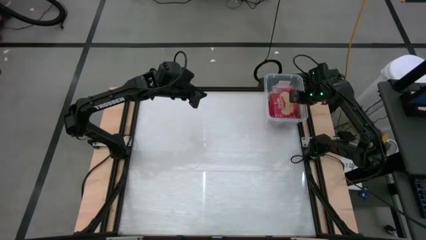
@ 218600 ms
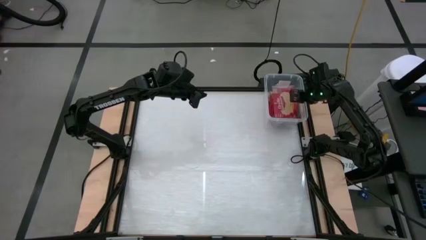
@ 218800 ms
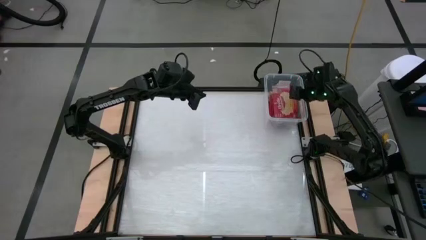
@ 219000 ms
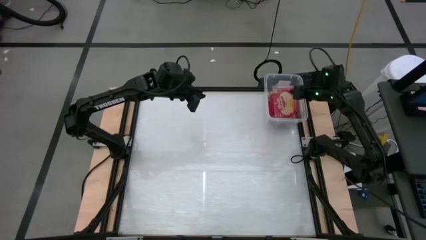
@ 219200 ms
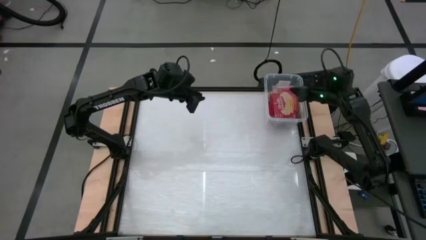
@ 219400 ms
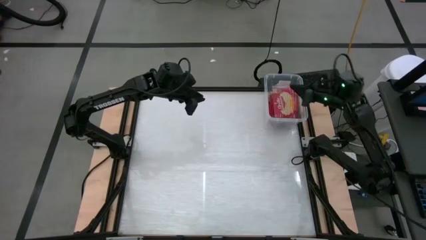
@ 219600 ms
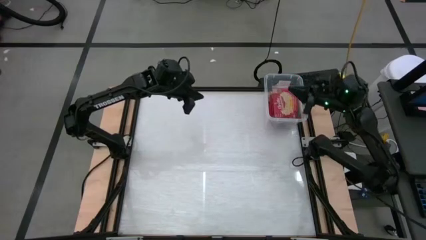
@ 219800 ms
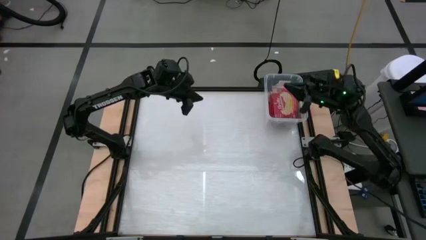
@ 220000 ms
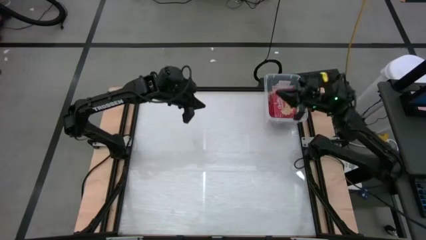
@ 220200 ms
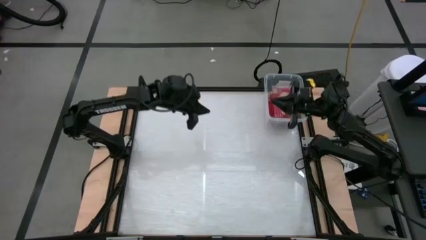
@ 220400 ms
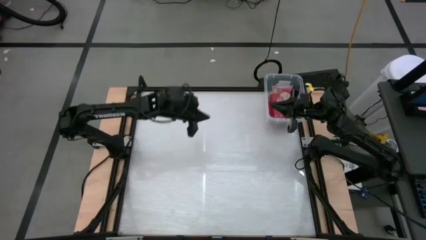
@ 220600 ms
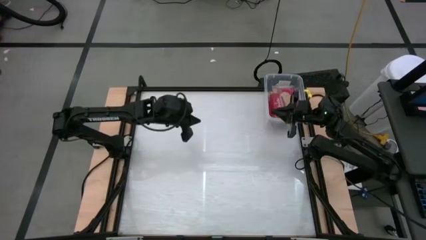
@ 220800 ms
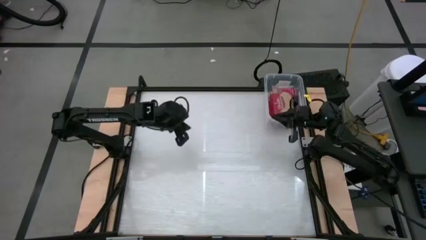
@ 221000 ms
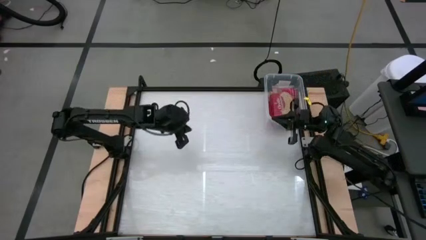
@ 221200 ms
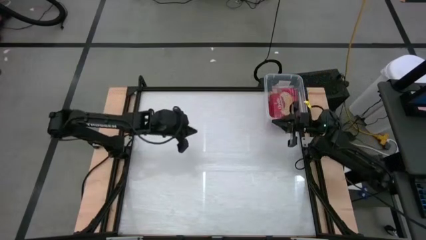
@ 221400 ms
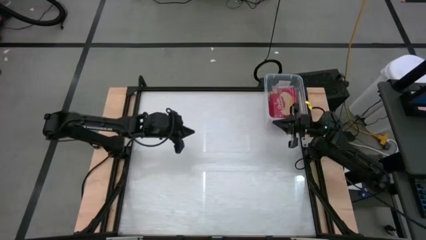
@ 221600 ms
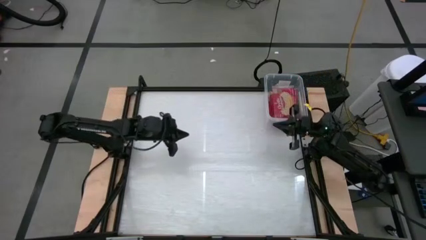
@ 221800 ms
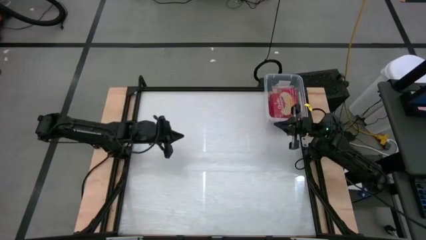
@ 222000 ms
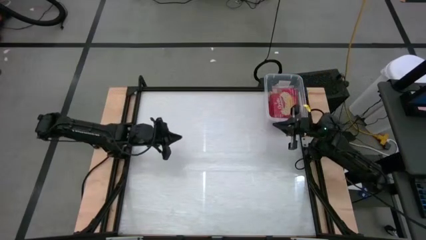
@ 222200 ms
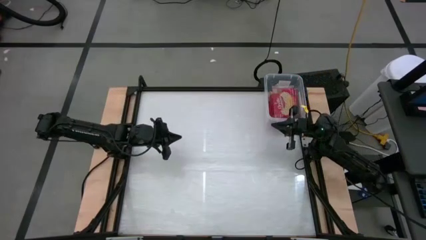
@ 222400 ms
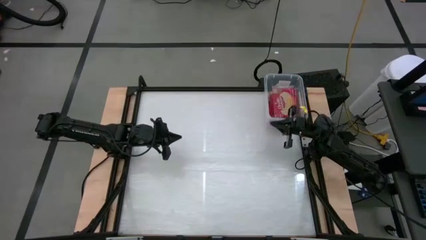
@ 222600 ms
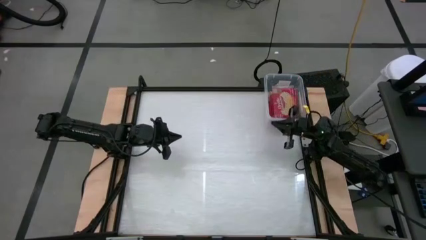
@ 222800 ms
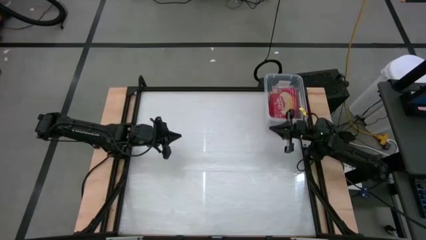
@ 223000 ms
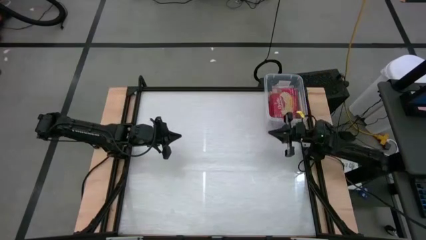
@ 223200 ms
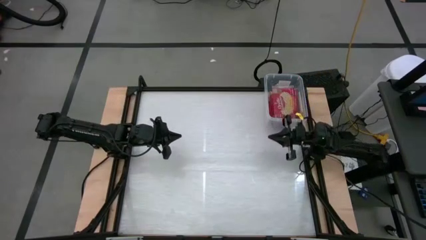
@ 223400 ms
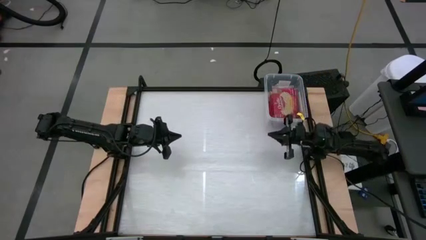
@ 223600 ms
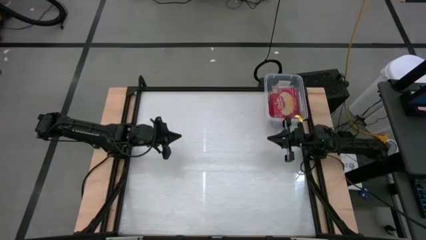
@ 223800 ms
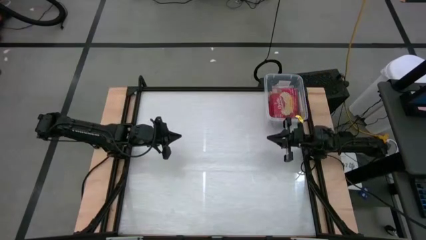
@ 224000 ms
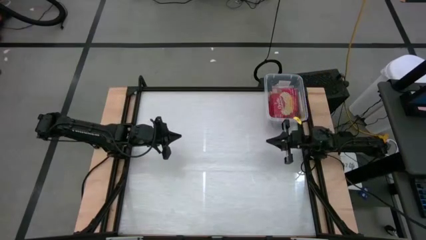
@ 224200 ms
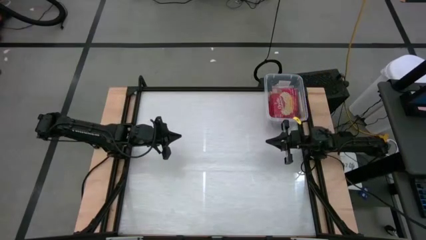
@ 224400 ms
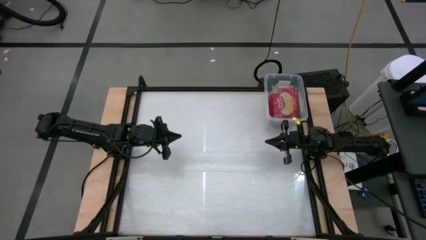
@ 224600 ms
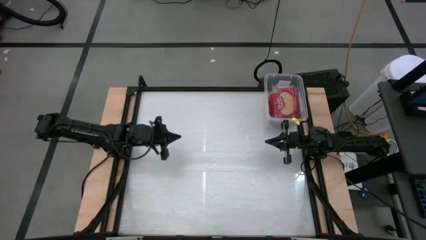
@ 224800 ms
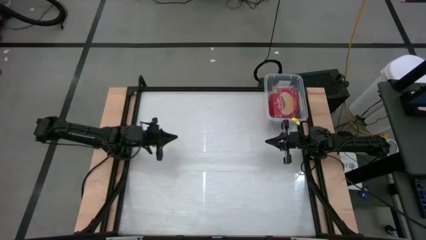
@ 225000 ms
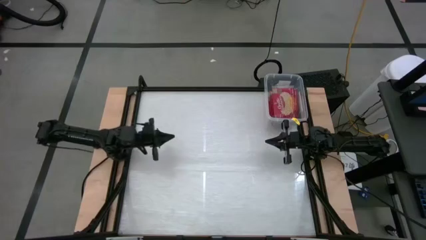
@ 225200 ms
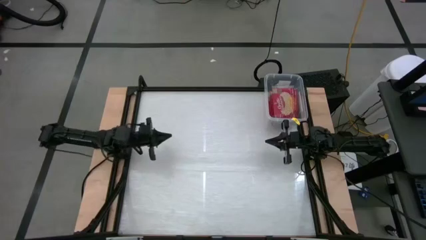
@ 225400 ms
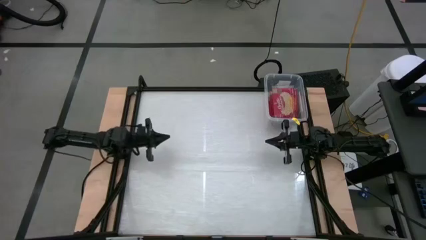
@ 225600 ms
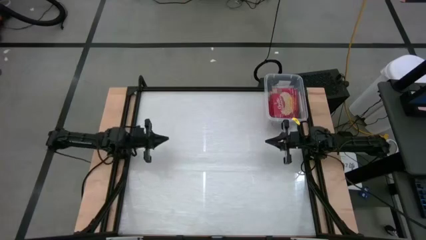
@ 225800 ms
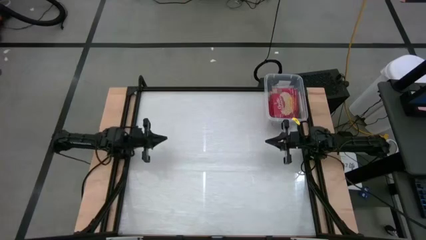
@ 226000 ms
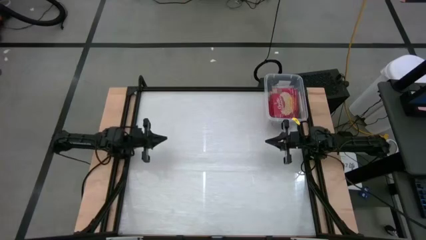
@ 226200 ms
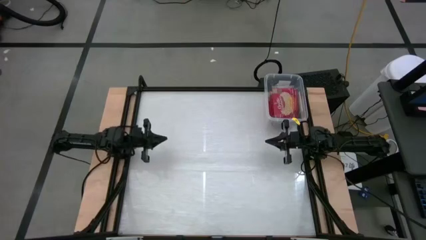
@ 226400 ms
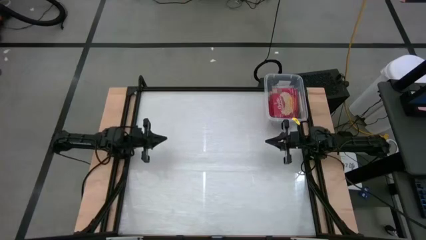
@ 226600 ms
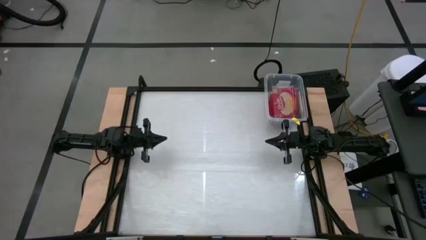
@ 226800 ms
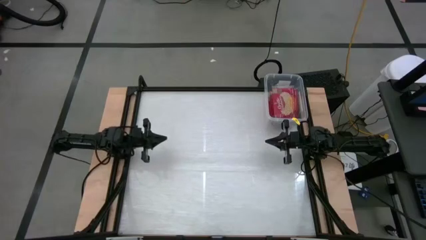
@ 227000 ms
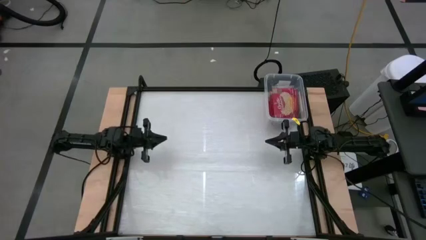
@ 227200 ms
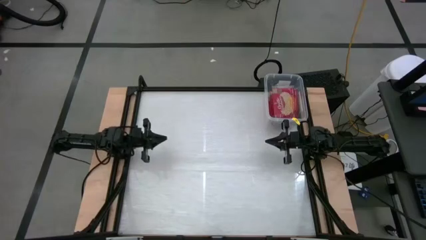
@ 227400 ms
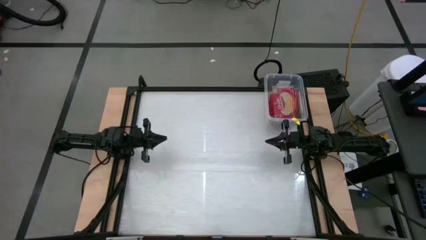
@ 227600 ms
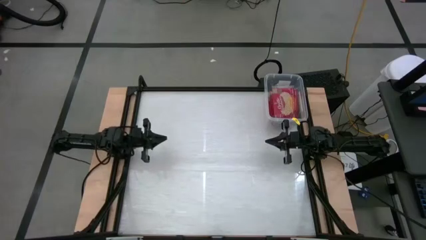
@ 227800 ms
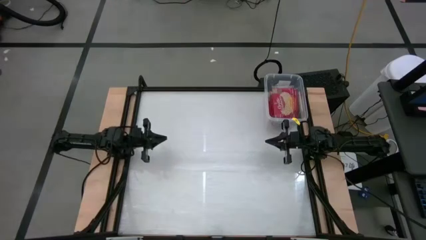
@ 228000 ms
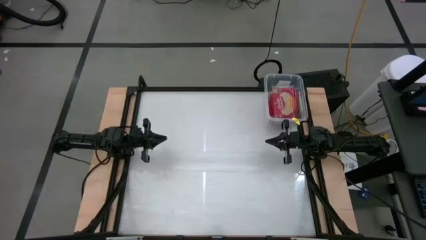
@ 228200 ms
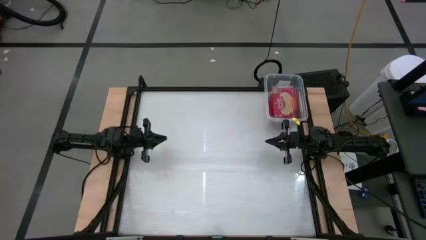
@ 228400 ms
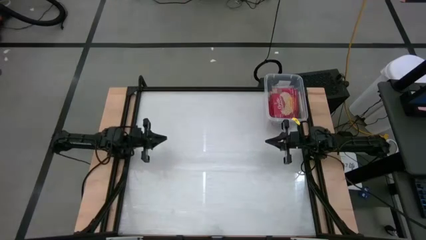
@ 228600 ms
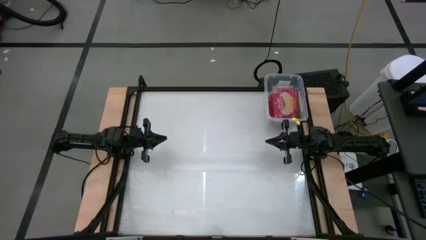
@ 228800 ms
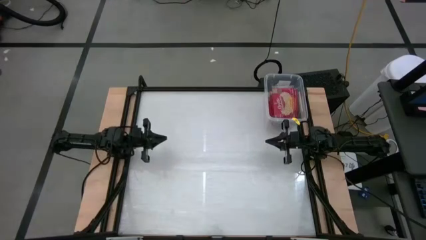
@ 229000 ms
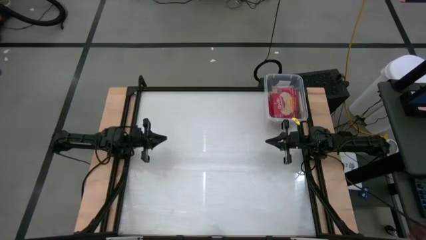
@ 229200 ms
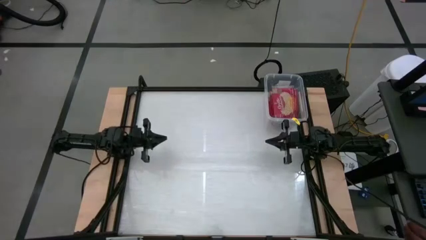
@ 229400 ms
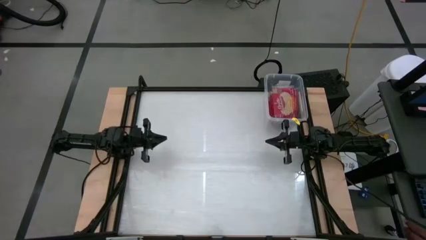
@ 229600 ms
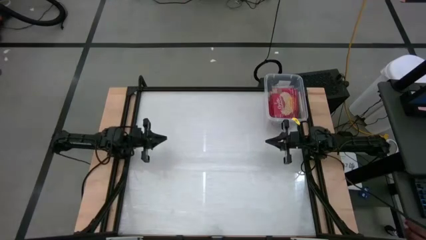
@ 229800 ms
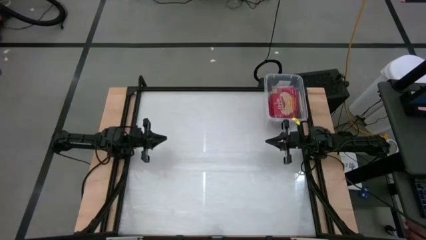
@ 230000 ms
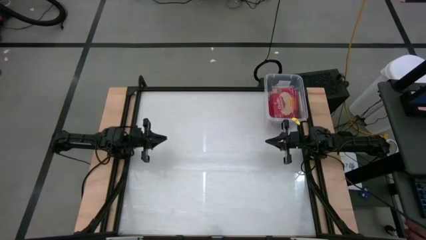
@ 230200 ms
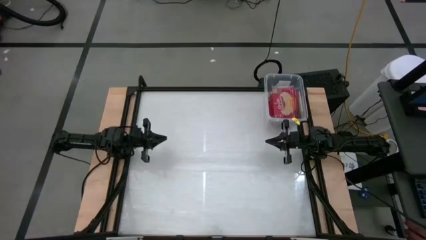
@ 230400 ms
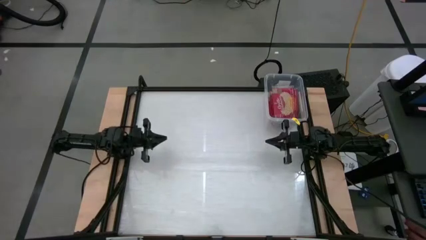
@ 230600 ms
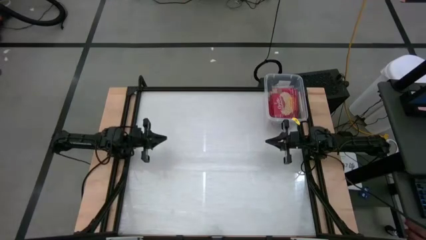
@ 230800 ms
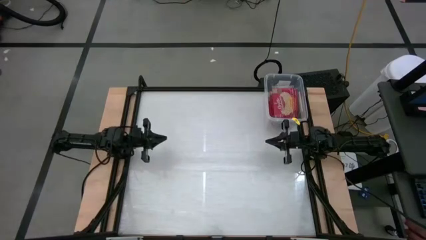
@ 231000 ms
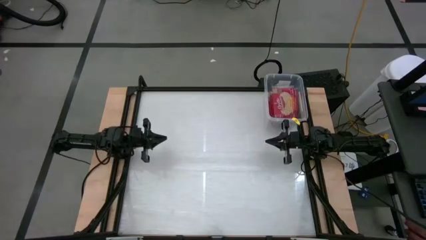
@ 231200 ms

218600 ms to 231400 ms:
Task: Sort popcorn bags into baskets
Return to Home Position

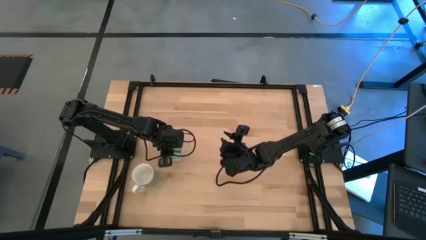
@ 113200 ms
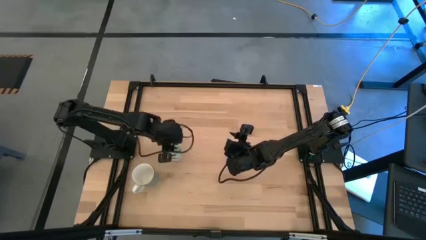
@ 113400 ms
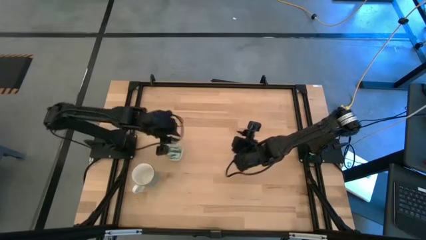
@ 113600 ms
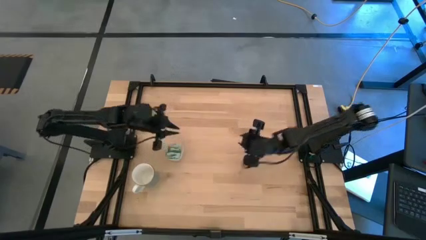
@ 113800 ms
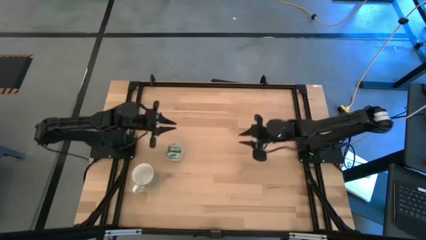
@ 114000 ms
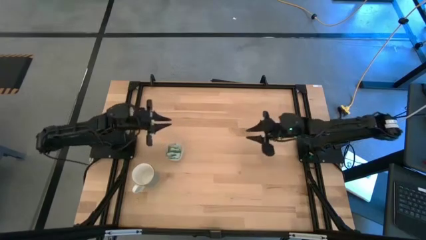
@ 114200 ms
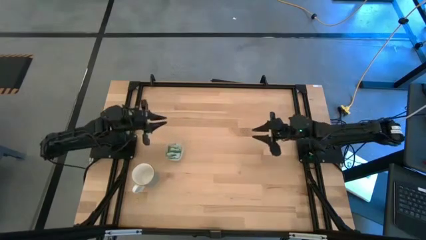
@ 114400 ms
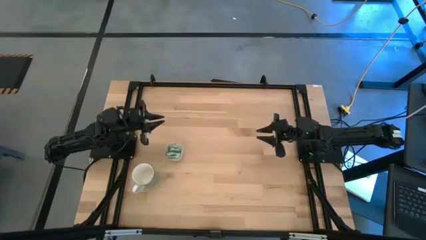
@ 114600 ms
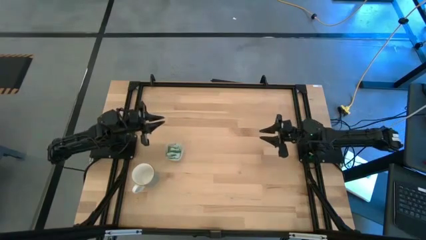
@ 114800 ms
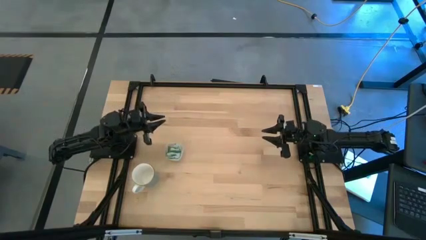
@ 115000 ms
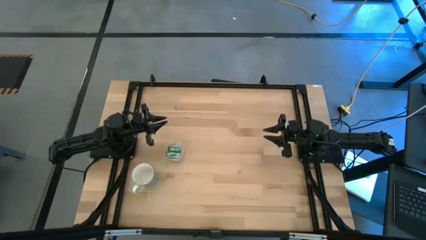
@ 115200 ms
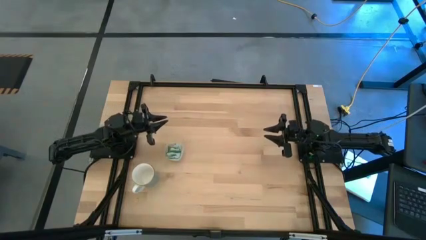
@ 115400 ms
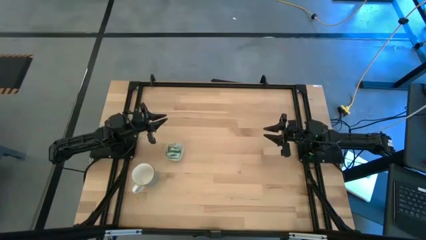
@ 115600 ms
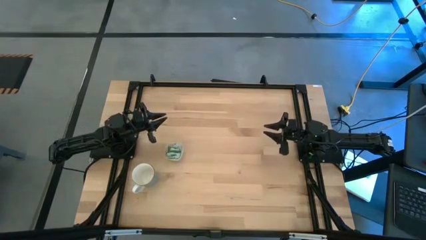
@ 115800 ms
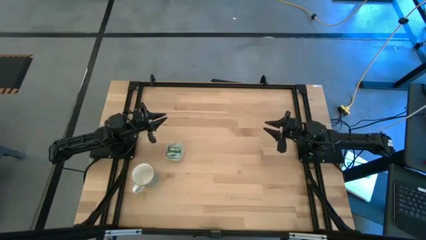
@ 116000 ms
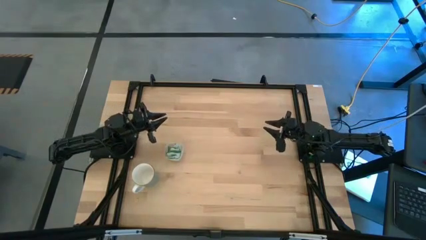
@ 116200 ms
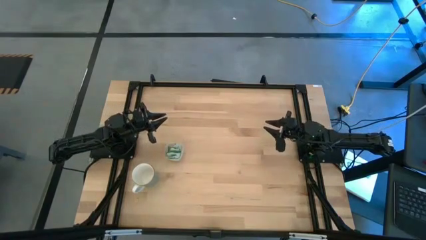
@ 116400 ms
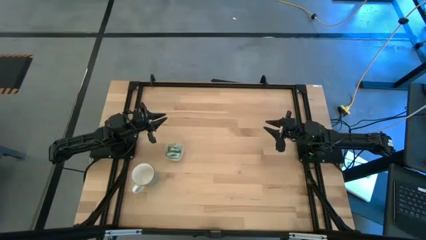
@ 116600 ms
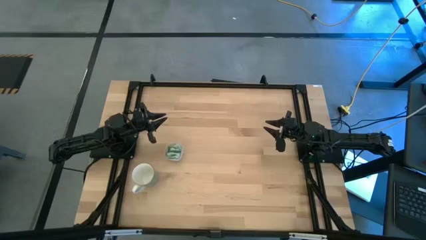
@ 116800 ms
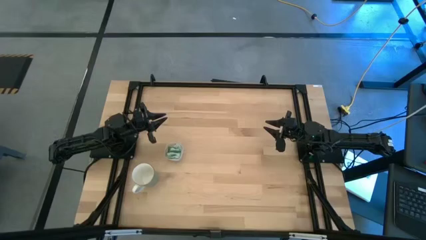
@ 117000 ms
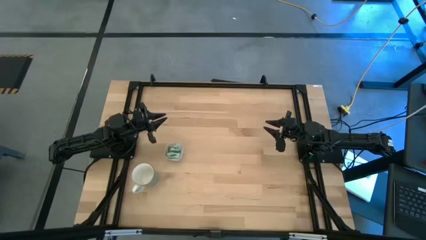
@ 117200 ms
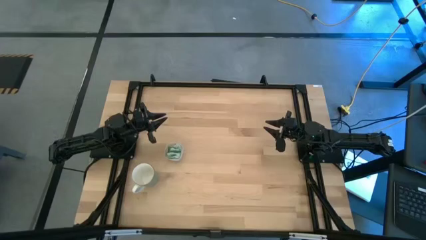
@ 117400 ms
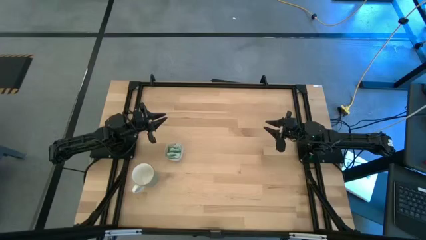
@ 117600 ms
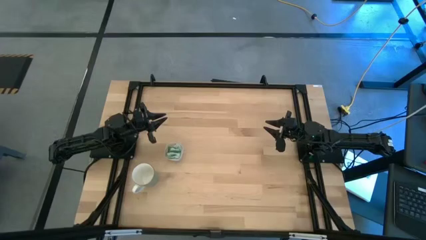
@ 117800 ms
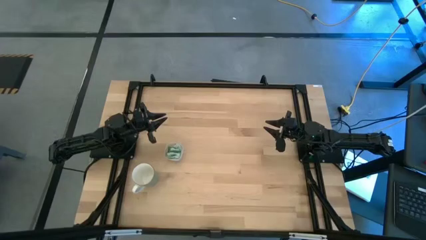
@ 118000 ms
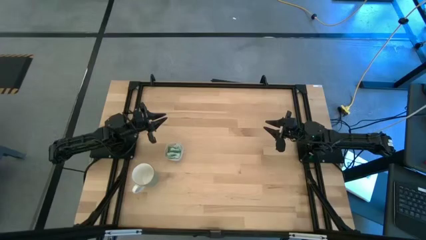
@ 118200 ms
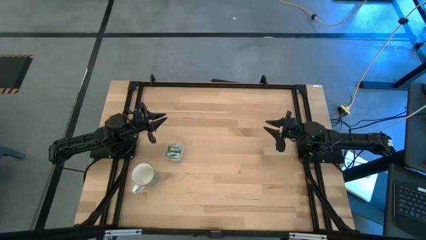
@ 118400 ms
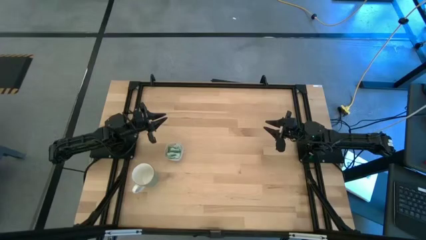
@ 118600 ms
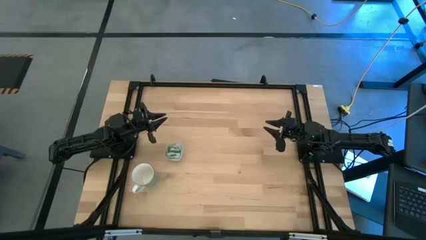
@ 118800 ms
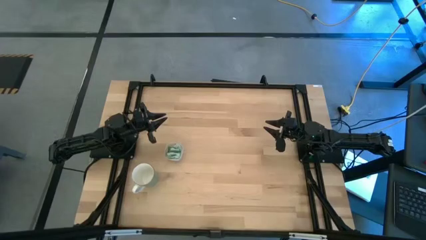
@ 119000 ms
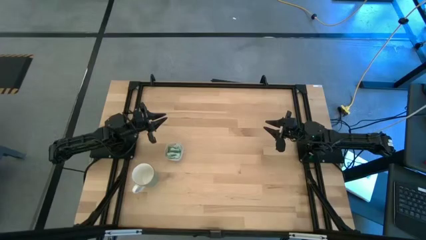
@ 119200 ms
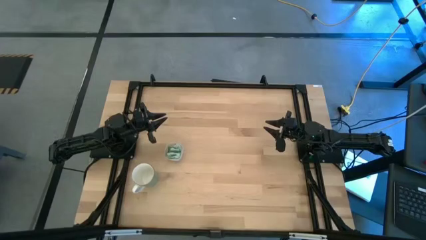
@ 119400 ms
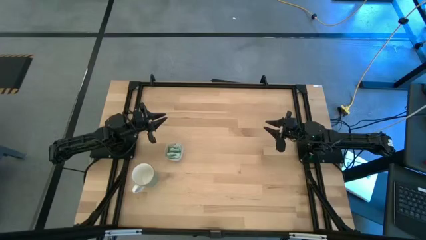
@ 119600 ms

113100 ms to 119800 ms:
Task: Pick and place Stevia / Truvia into bins
Return to Home Position
